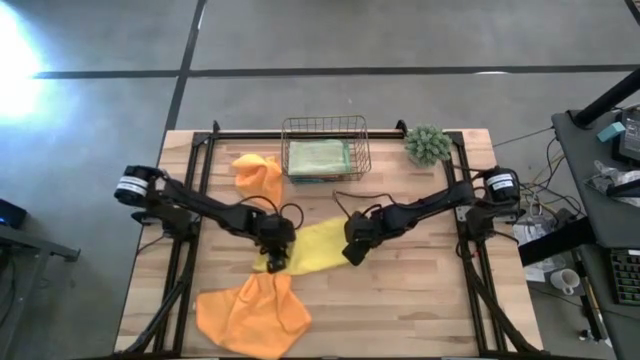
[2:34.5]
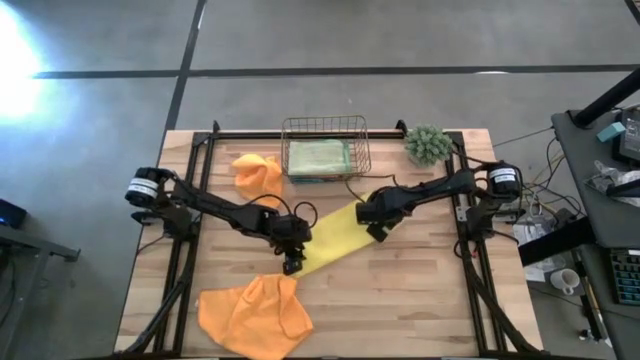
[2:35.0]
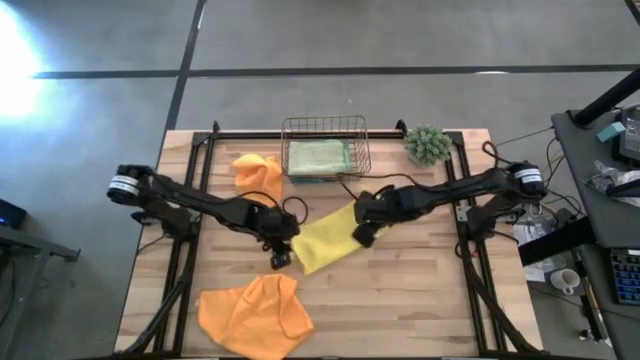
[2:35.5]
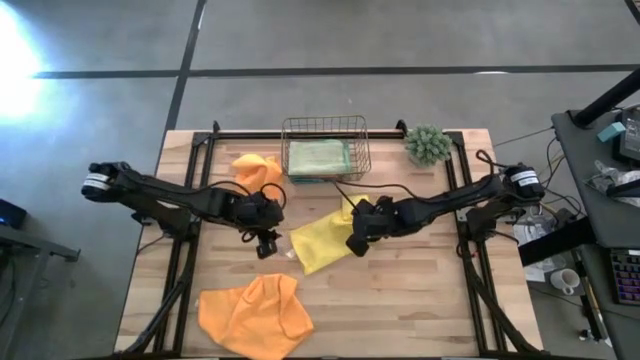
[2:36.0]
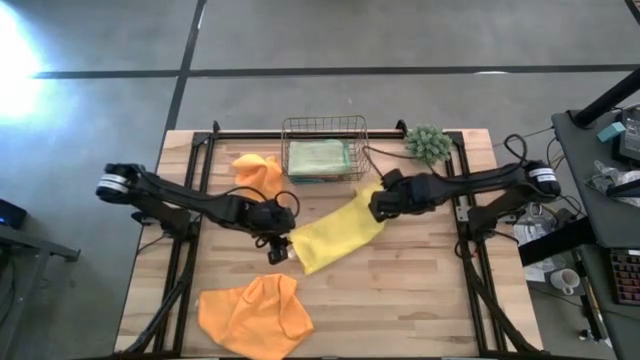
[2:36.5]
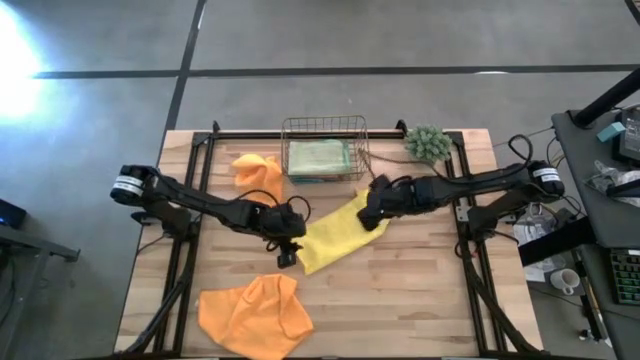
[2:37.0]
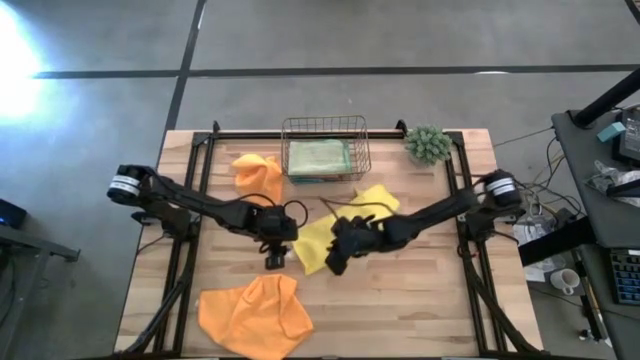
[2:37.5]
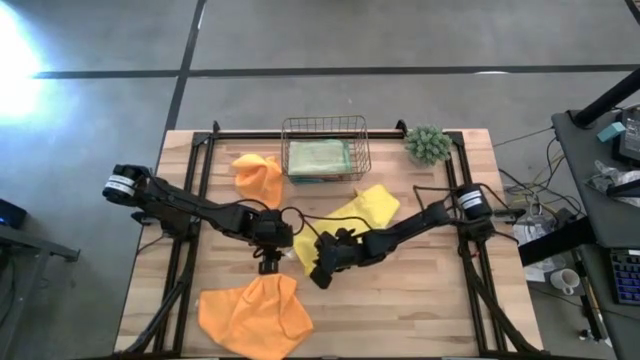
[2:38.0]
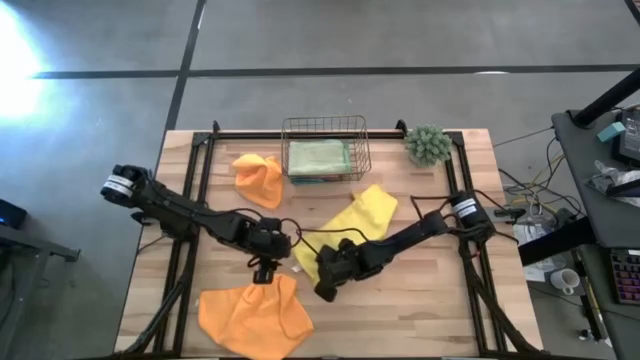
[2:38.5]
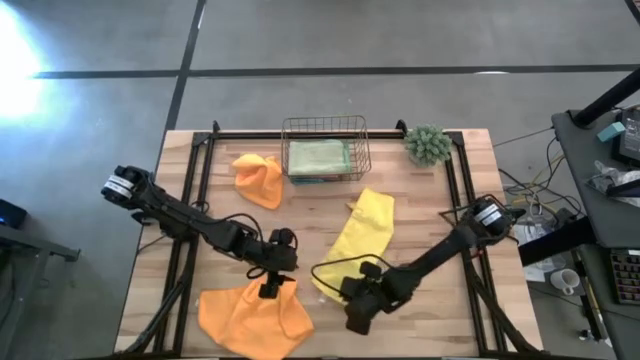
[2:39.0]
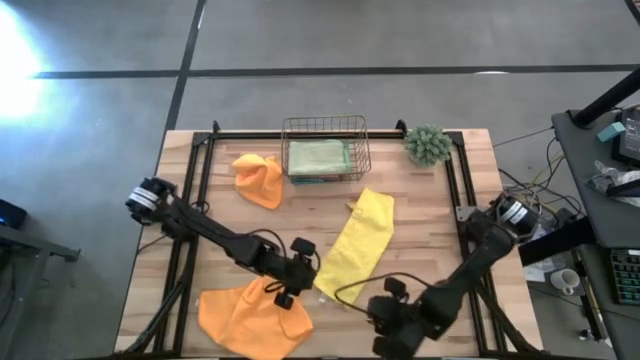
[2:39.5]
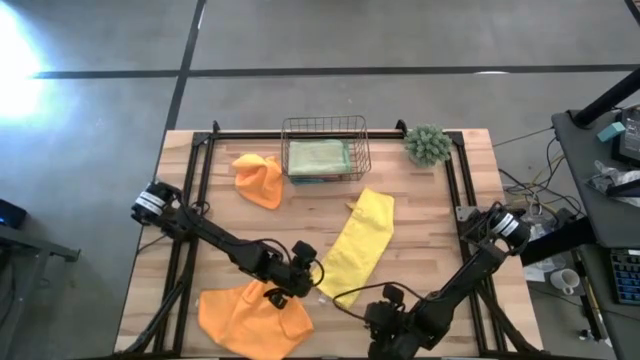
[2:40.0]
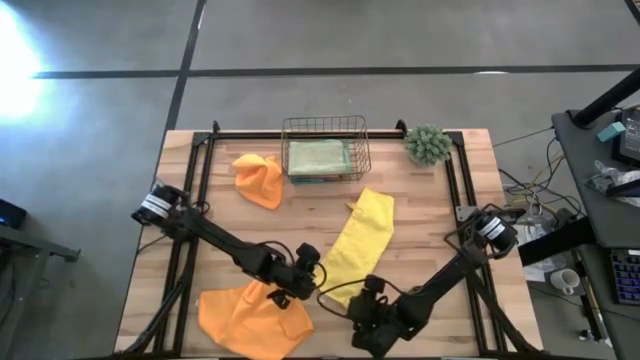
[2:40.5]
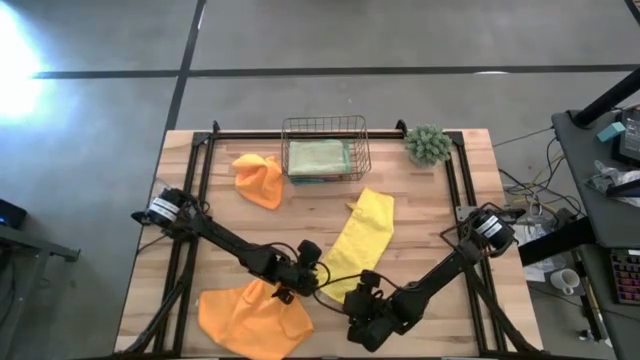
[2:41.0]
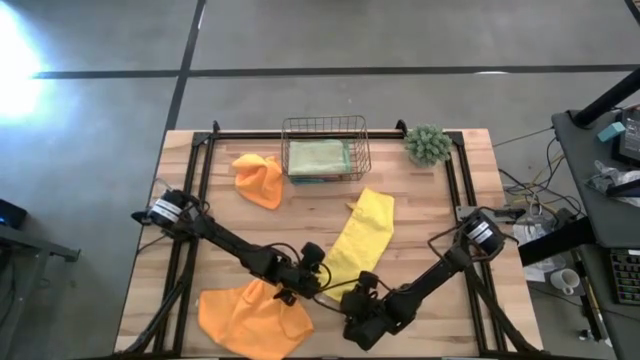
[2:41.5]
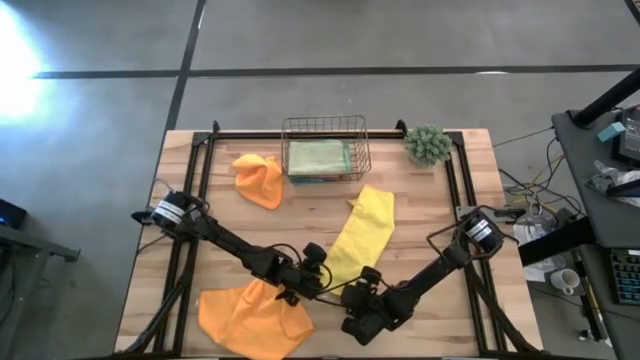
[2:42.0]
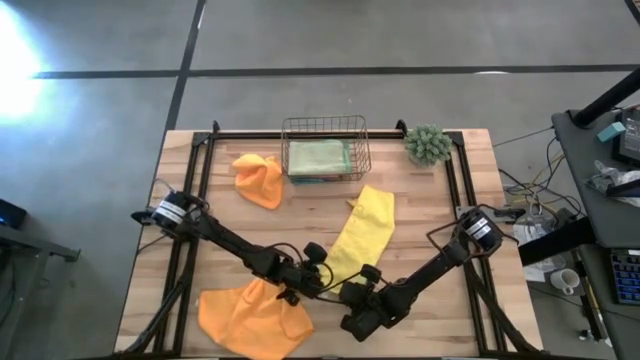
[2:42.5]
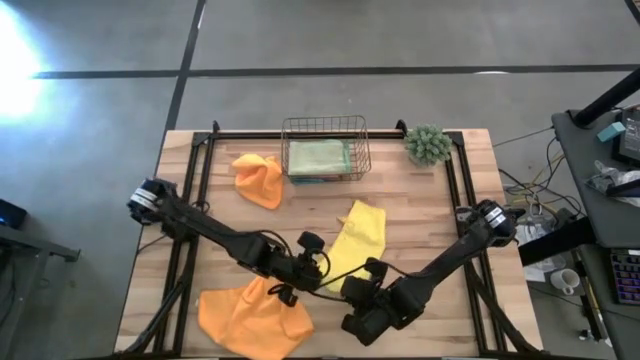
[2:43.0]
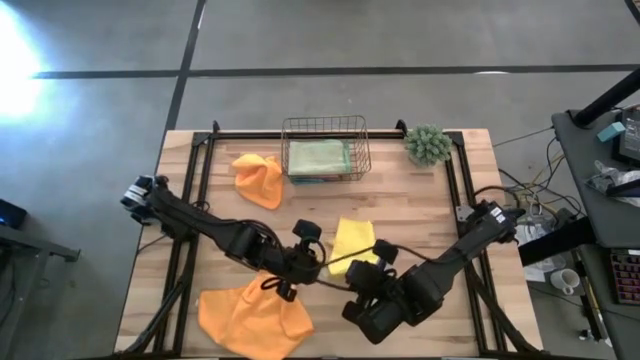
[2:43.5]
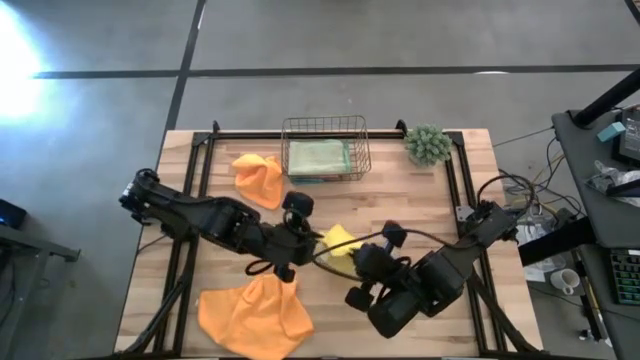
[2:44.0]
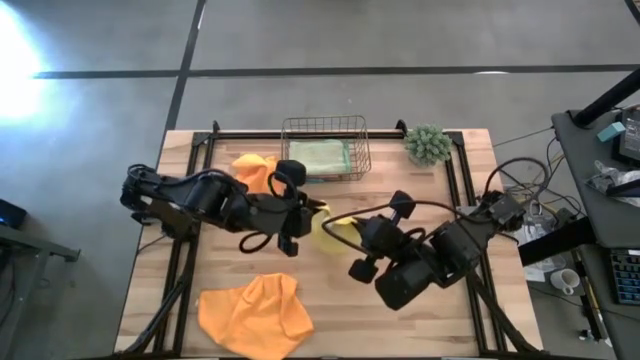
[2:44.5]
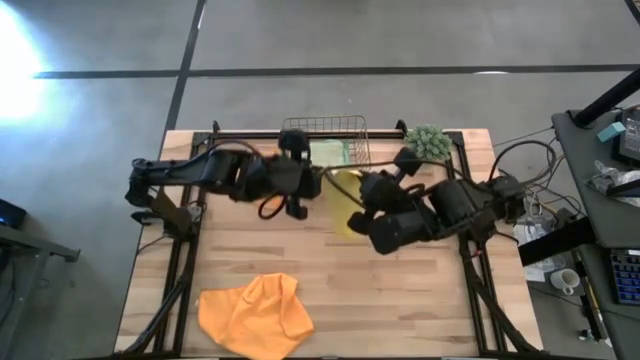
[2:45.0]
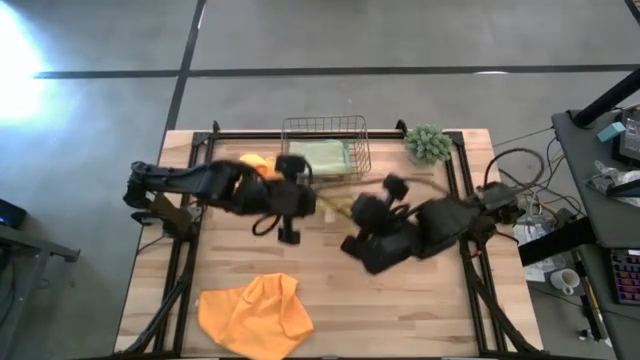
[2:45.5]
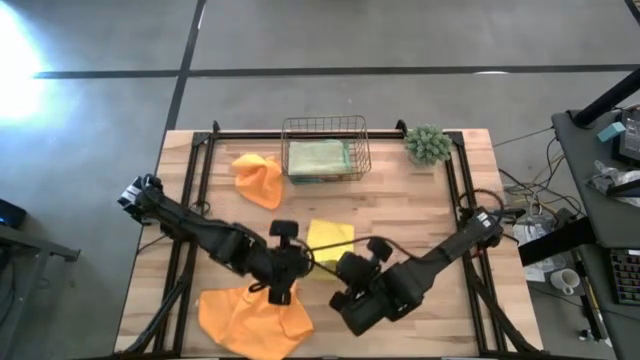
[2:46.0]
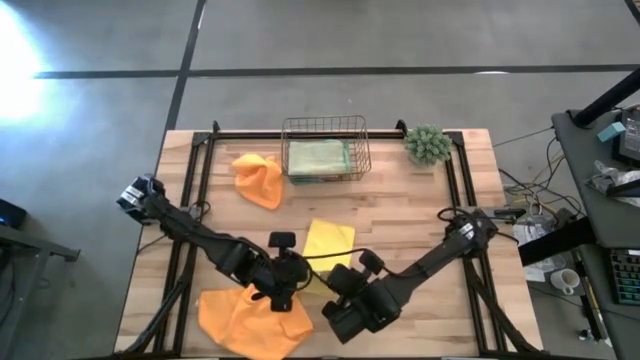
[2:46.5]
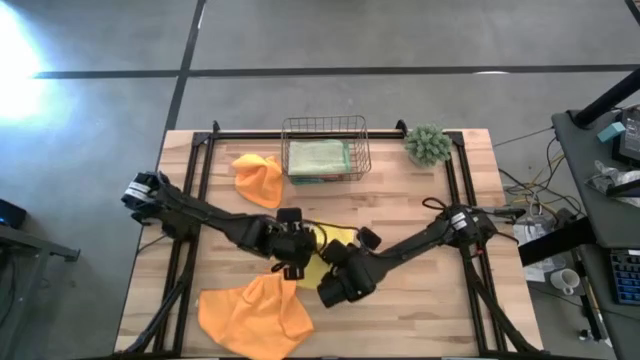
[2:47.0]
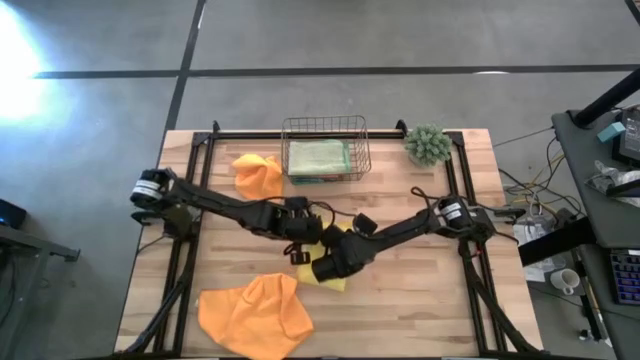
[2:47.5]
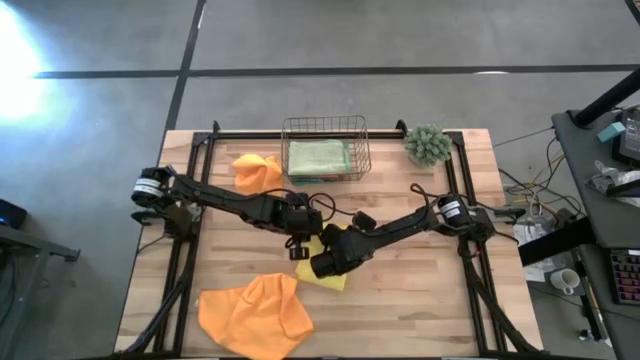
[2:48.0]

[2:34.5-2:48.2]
Task: Fold microfiber towels
Fold the yellow microfiber cloth

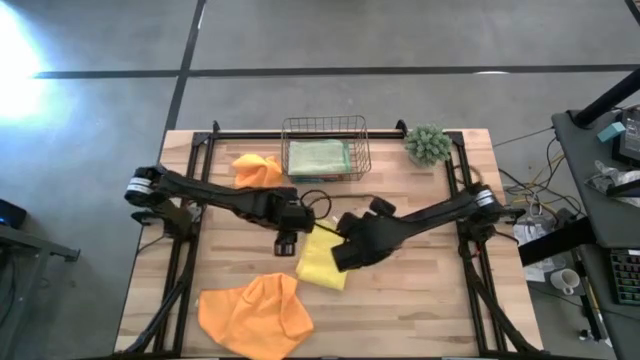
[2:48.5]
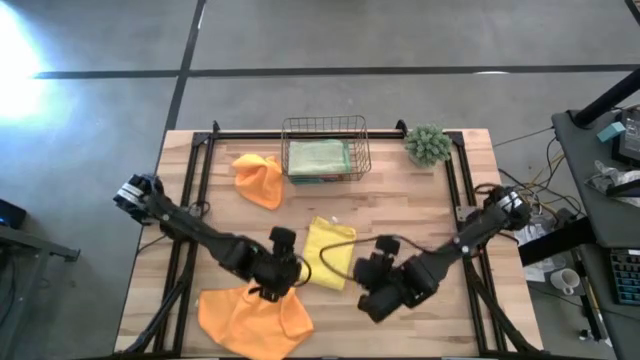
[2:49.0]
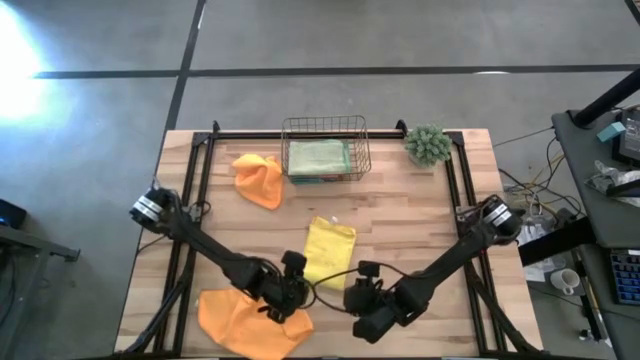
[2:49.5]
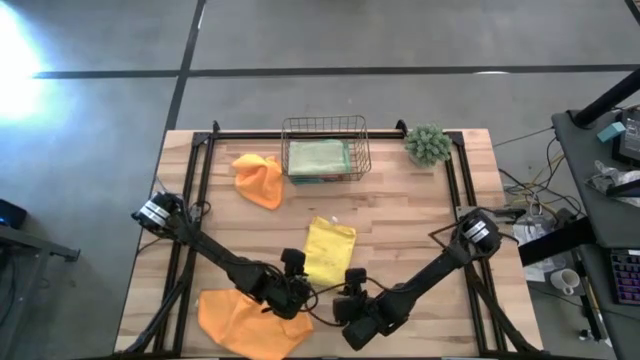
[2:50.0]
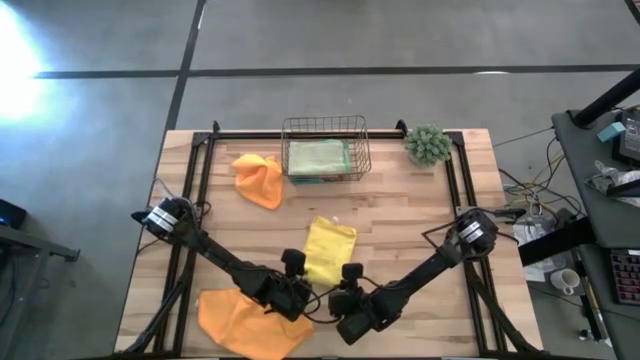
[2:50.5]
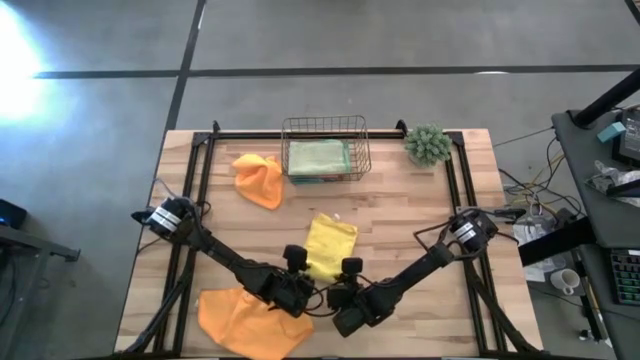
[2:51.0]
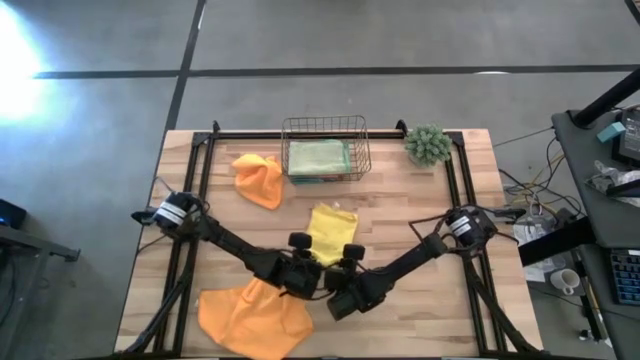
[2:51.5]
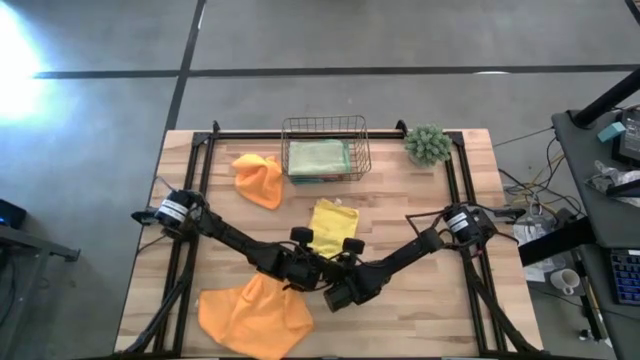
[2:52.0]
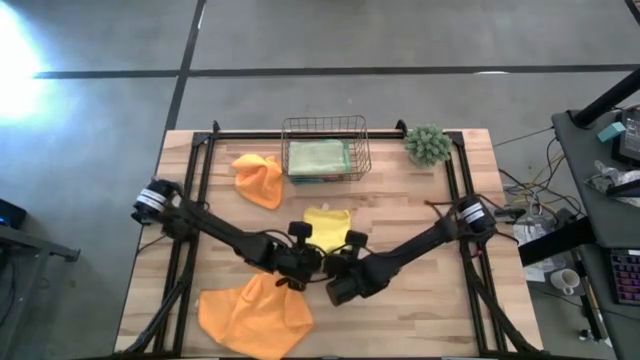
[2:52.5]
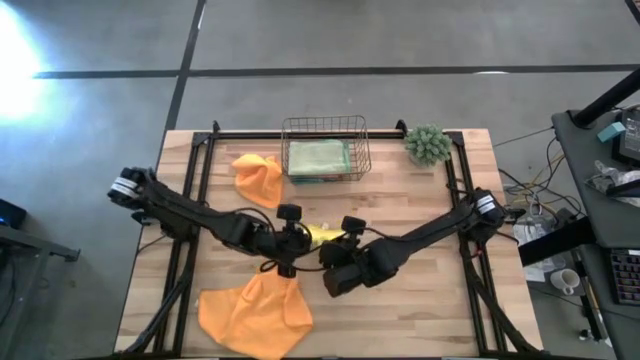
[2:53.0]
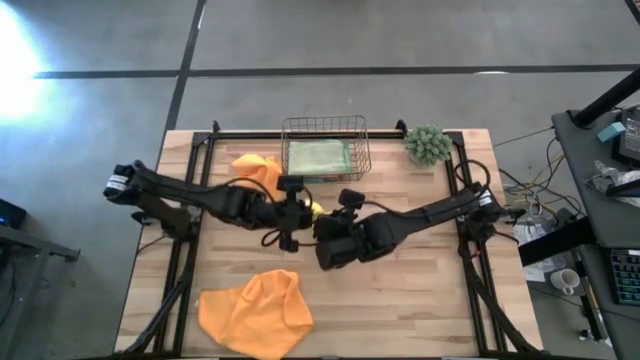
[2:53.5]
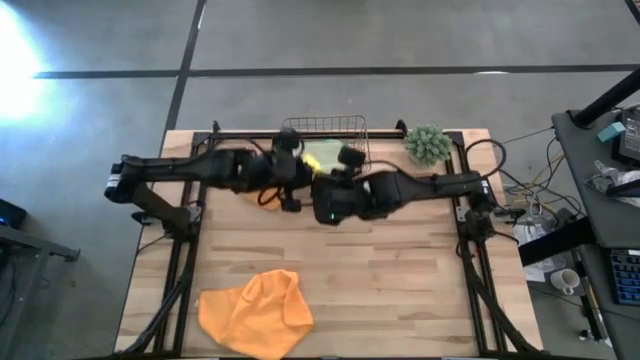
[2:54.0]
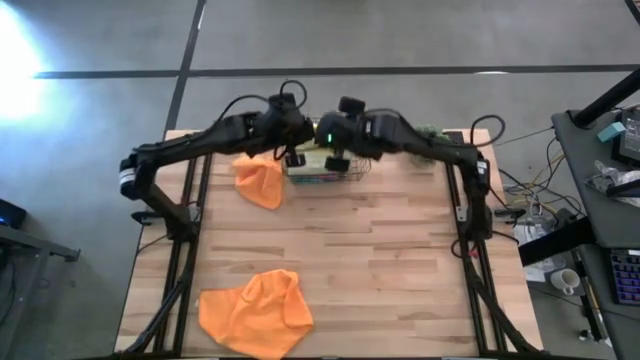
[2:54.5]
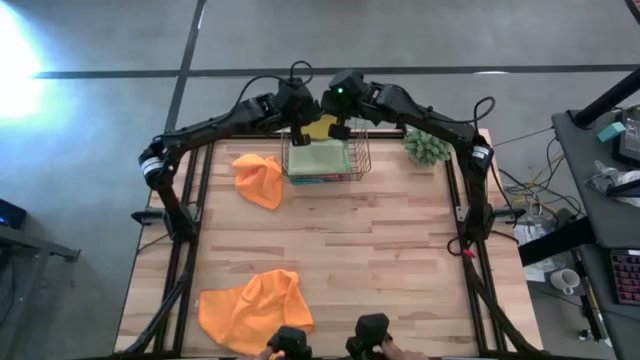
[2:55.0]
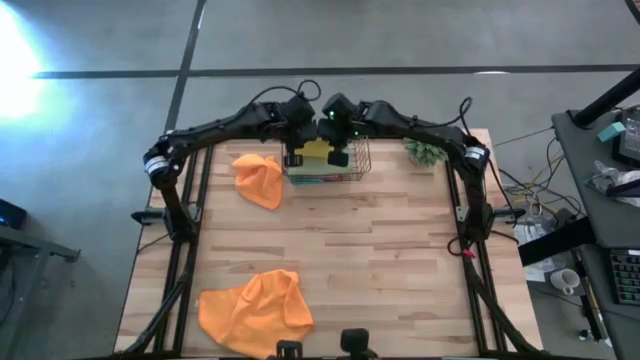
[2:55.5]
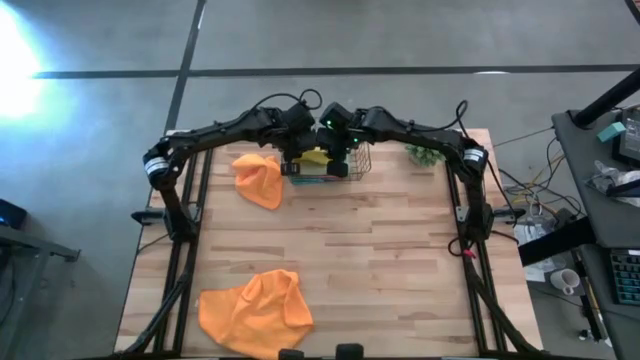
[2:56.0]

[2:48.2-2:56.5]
Put the yellow microfiber cloth into the wire basket
